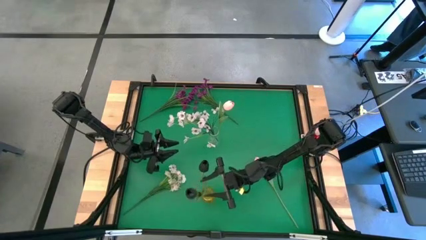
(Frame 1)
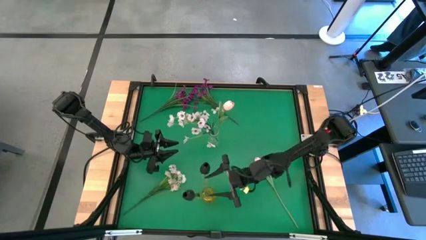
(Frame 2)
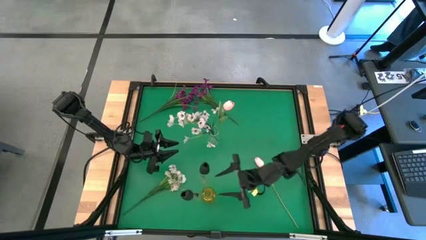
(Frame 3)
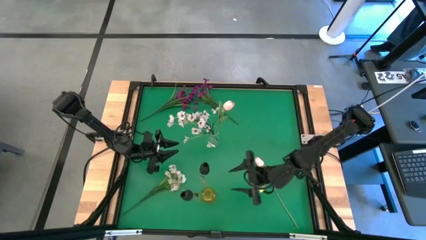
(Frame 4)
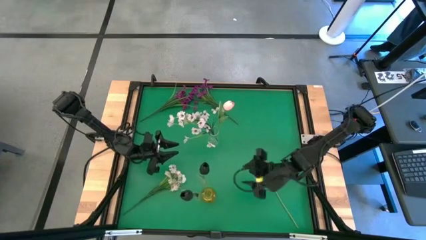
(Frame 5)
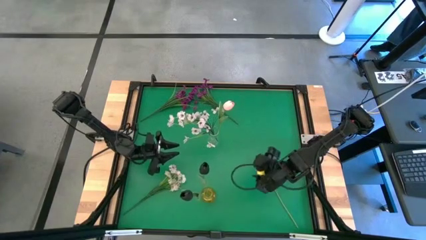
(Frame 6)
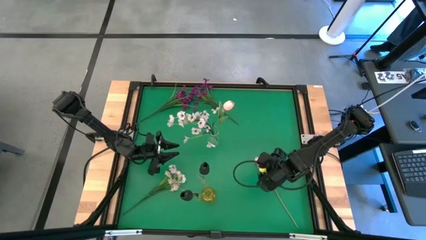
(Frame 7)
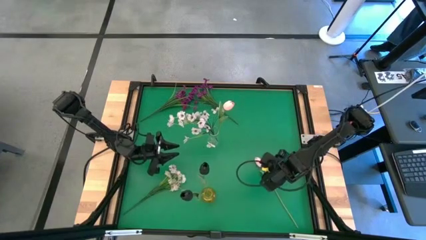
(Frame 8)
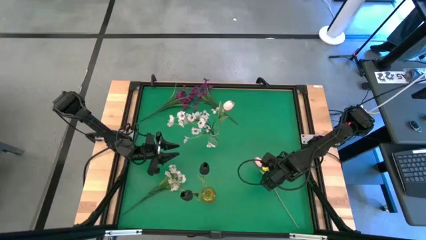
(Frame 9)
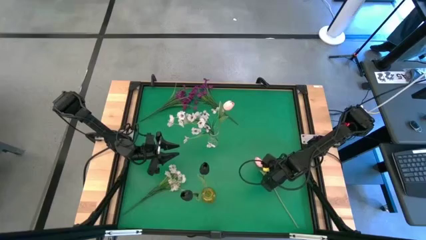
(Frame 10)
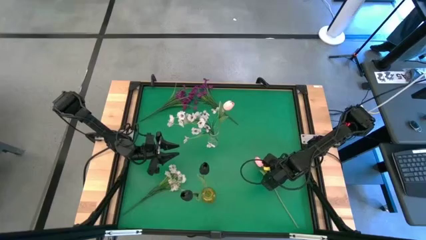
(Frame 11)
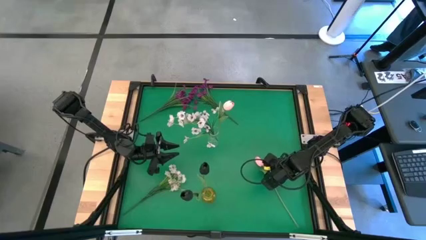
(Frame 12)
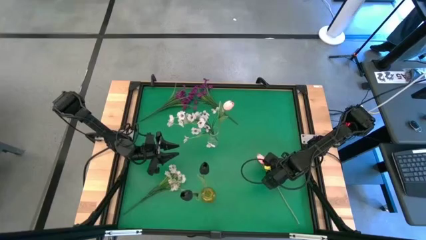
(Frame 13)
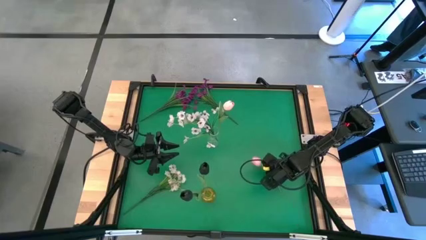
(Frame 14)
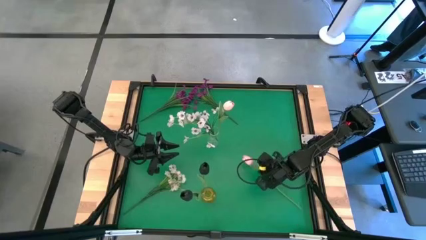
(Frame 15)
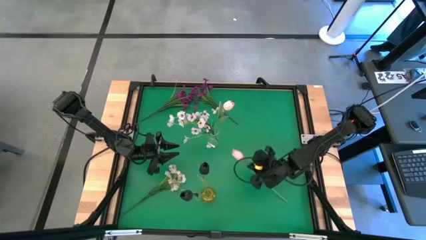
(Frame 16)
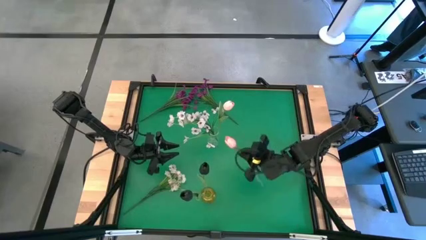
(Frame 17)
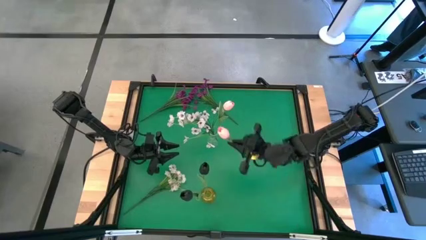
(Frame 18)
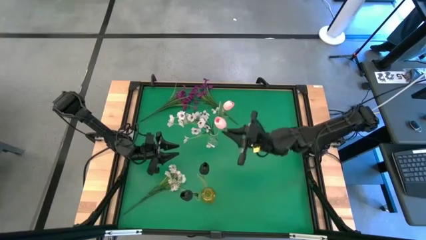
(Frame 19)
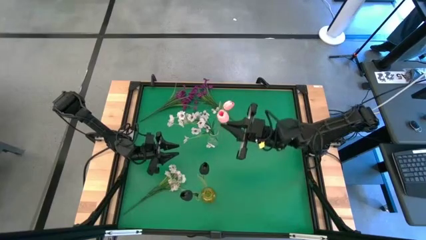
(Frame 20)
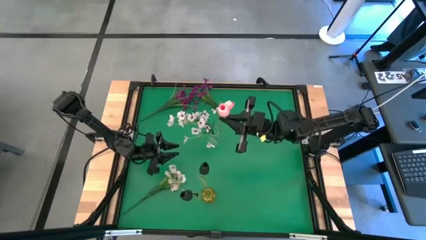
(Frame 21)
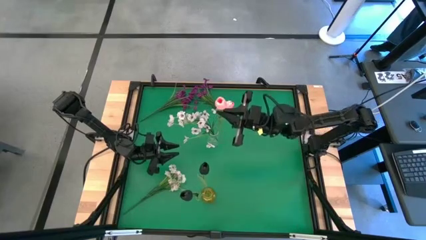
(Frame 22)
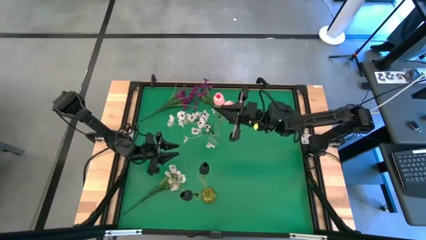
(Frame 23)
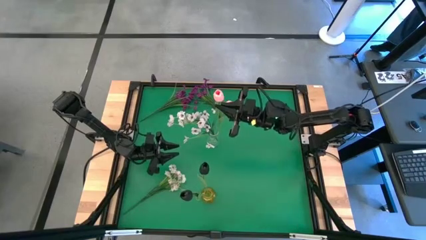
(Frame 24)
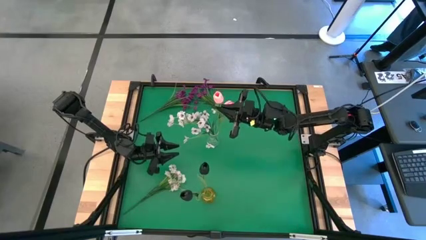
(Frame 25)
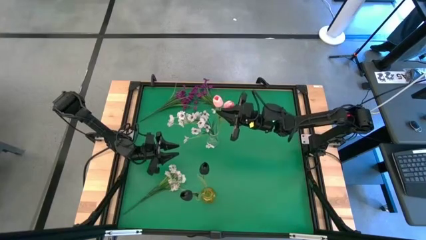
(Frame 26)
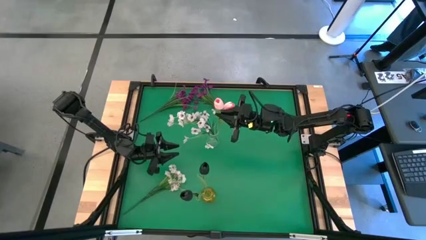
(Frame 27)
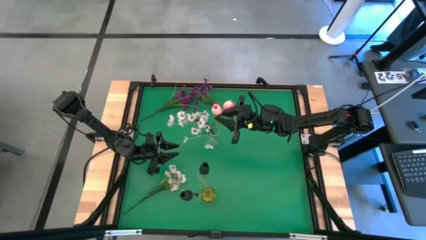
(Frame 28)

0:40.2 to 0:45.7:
Task: Sort flowers into vase by color
Put the pink tulip flower into the transparent vase

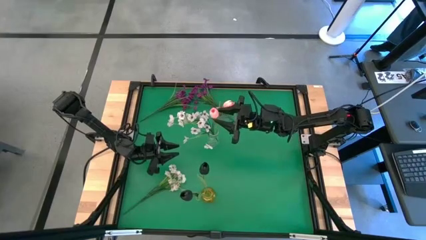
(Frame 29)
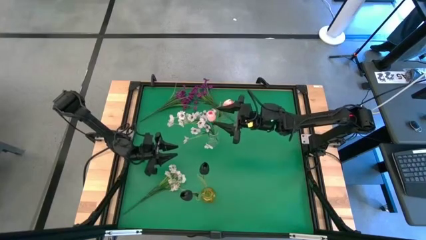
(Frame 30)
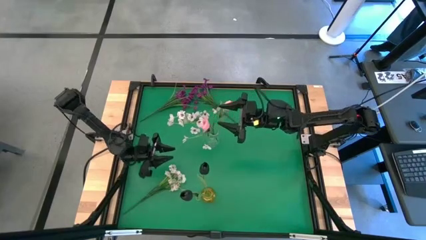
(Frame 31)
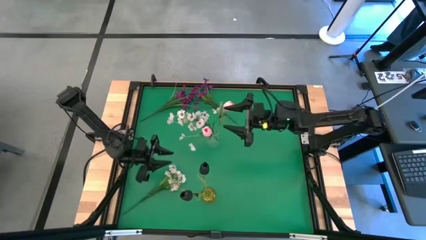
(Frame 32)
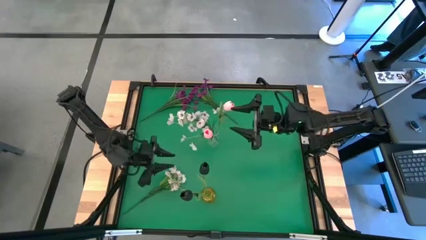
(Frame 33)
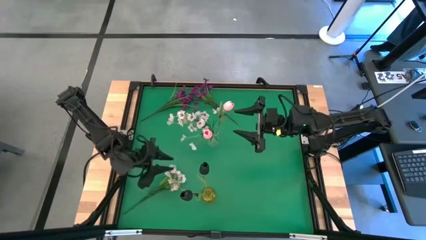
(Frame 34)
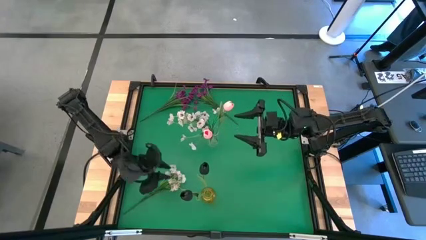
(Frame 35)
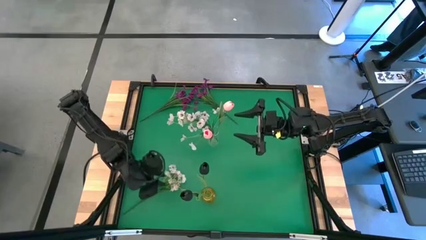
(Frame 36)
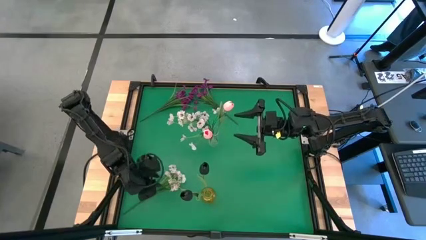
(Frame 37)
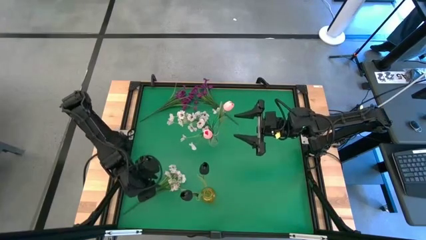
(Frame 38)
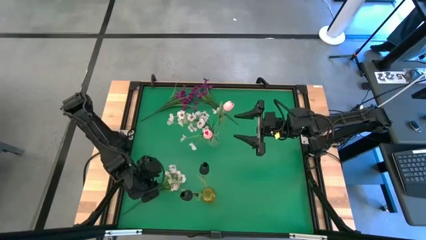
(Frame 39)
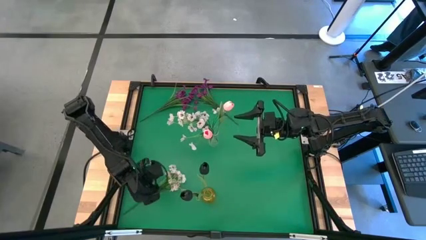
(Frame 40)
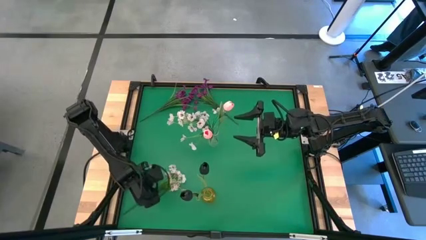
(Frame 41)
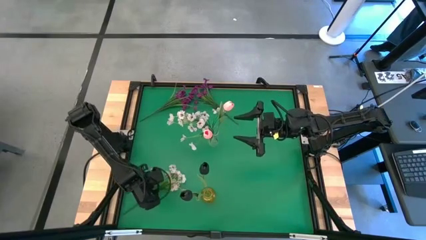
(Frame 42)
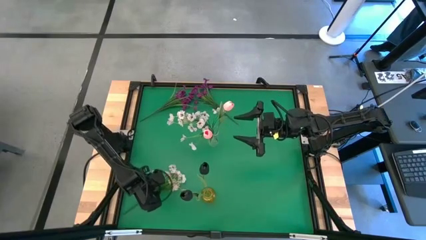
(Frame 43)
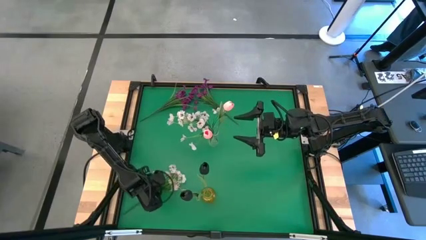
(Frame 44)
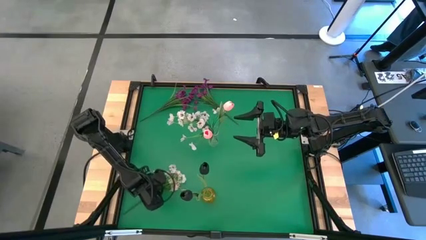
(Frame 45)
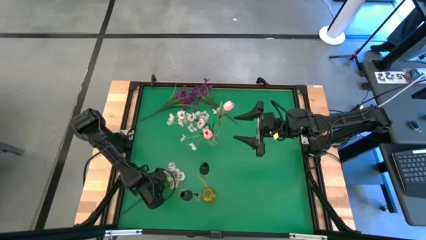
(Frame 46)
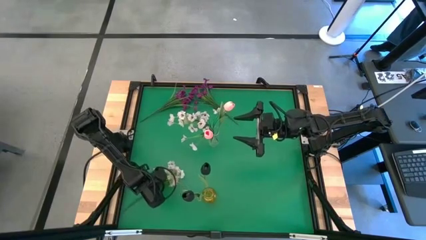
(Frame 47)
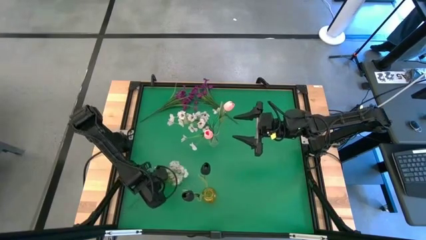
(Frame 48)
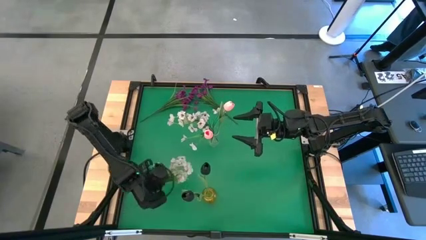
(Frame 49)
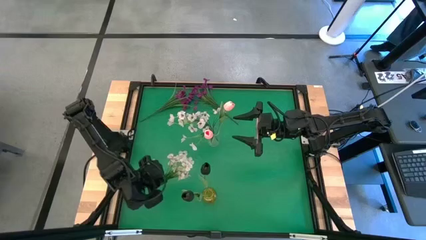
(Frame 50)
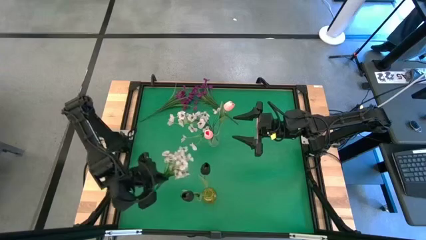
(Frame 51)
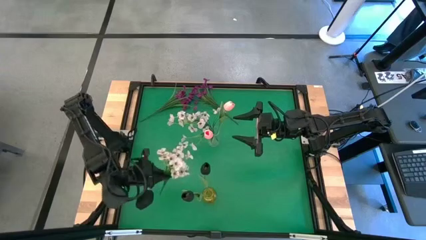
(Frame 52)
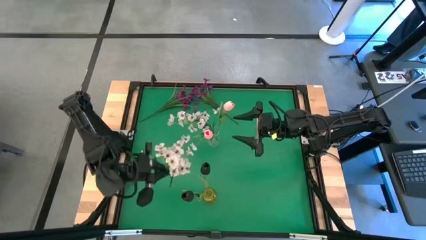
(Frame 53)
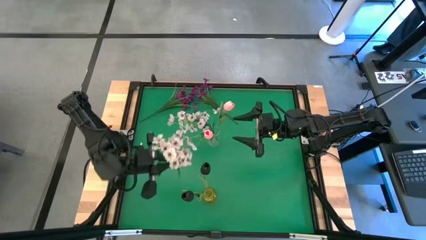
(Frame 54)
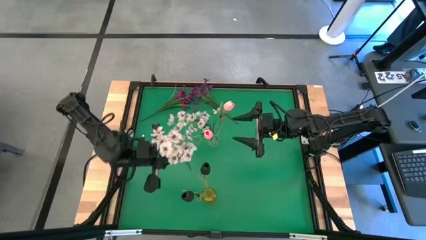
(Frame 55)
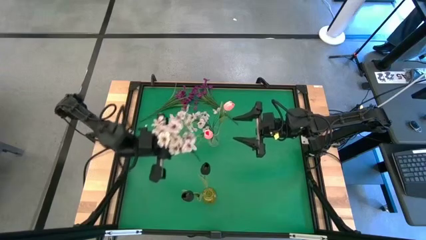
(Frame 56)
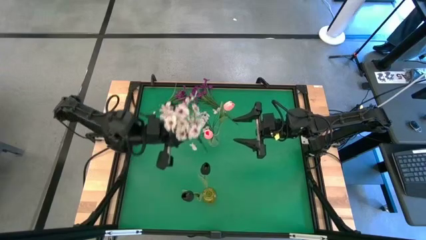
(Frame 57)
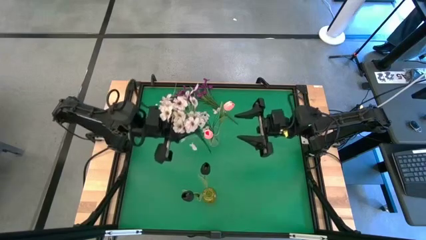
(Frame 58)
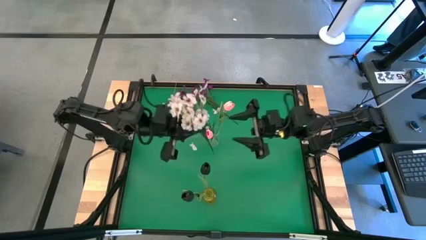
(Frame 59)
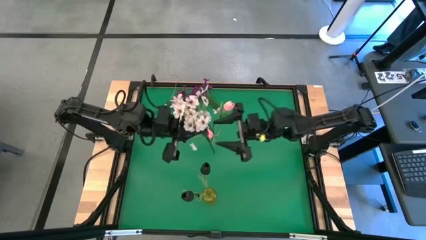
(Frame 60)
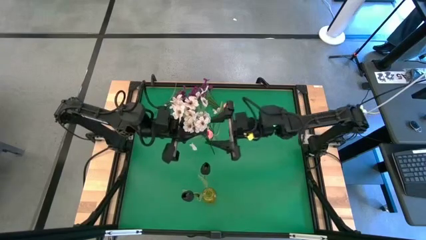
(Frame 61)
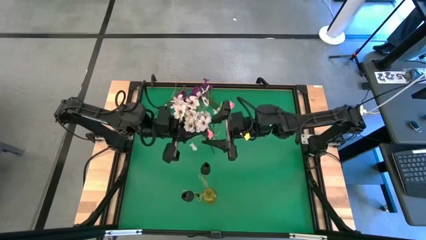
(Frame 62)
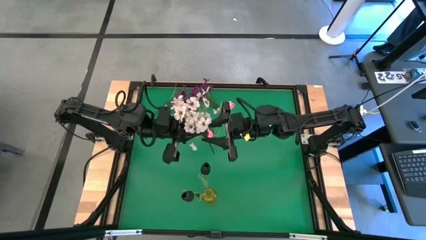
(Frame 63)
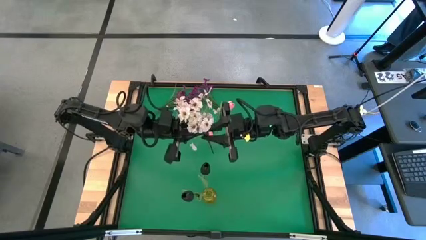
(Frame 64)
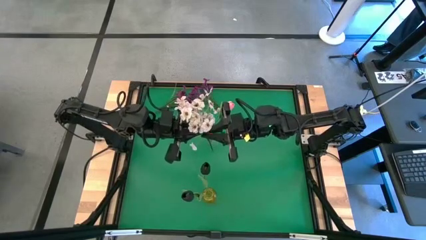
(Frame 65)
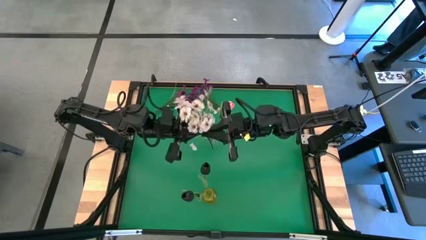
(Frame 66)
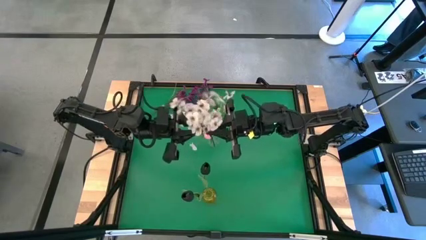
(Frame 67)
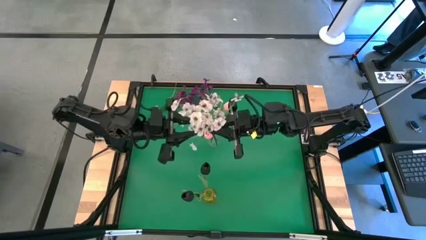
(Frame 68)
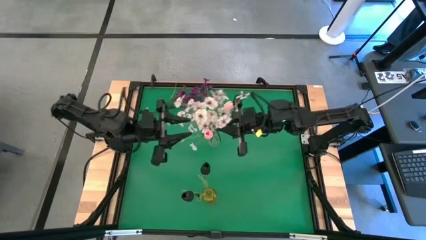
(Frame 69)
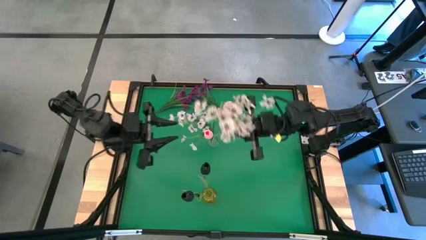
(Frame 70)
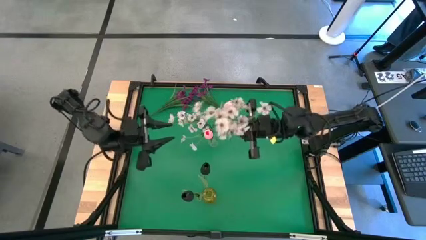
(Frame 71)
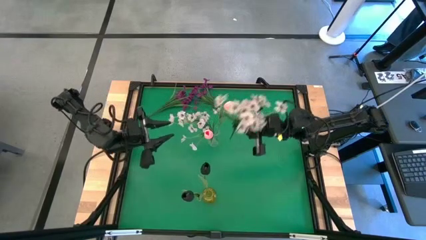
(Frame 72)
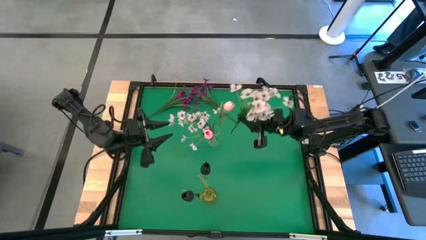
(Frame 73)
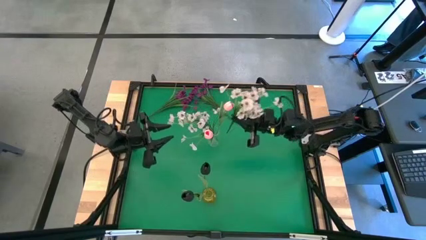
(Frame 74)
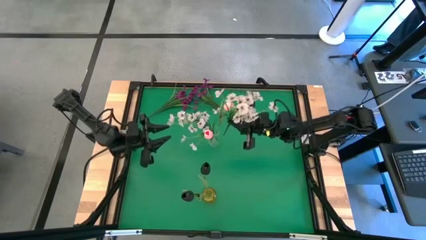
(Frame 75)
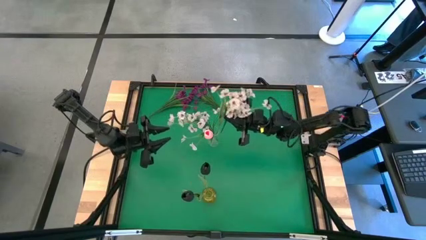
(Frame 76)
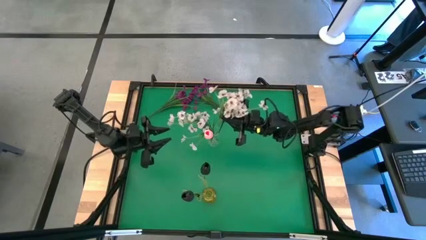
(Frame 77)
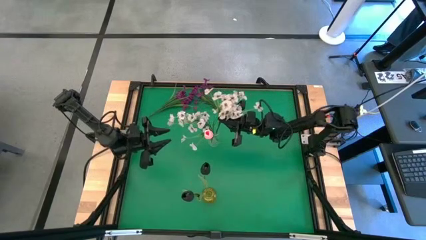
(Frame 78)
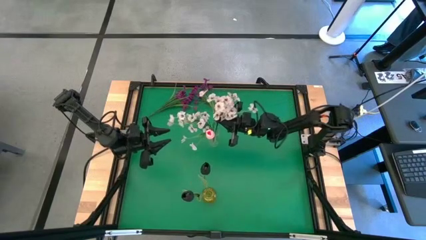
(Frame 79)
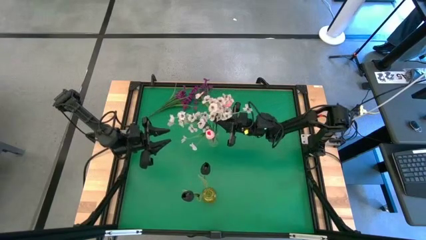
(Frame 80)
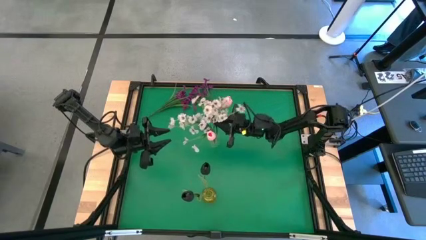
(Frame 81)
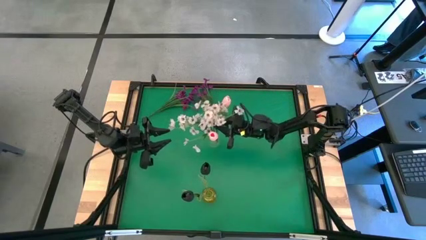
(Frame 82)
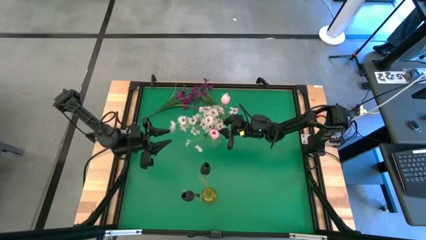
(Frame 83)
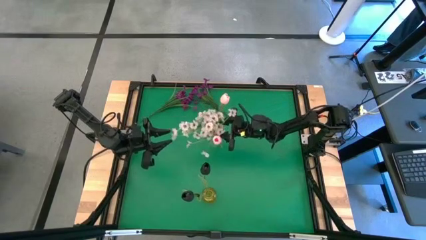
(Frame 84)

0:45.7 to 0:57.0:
Put the white flowers into the transparent vase
